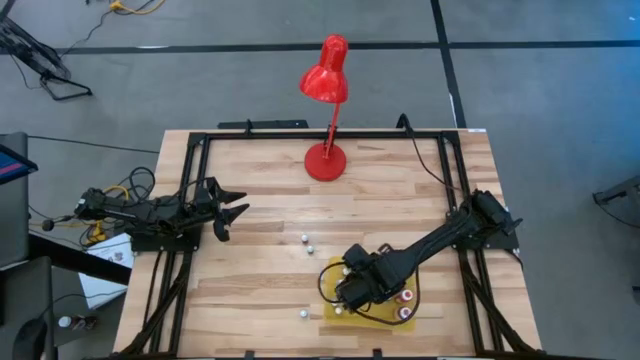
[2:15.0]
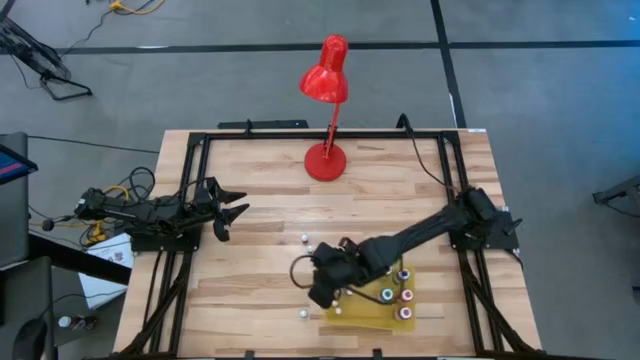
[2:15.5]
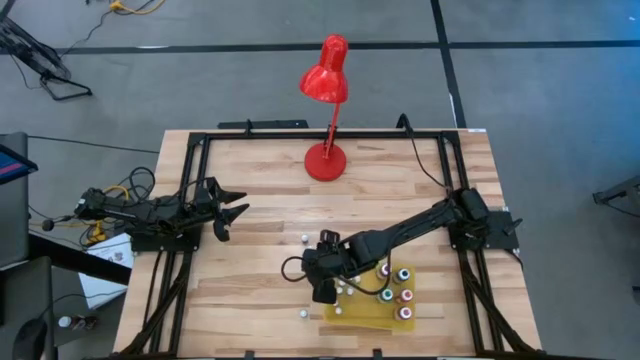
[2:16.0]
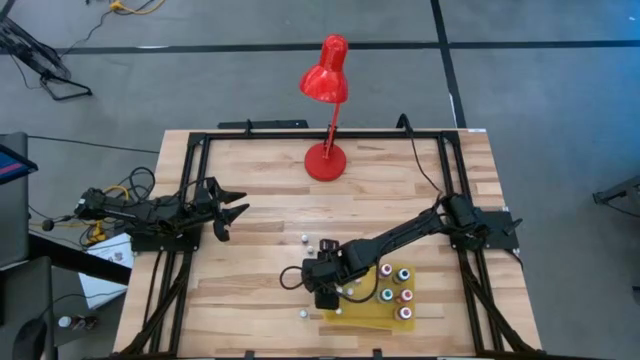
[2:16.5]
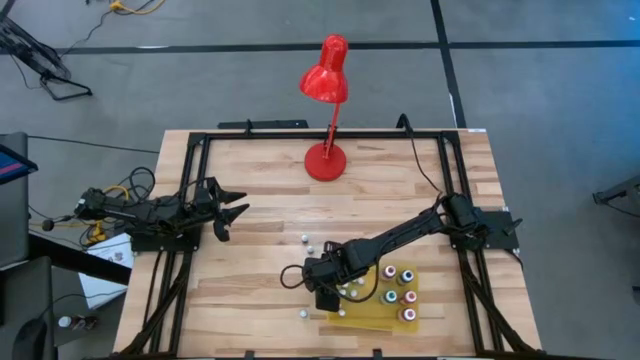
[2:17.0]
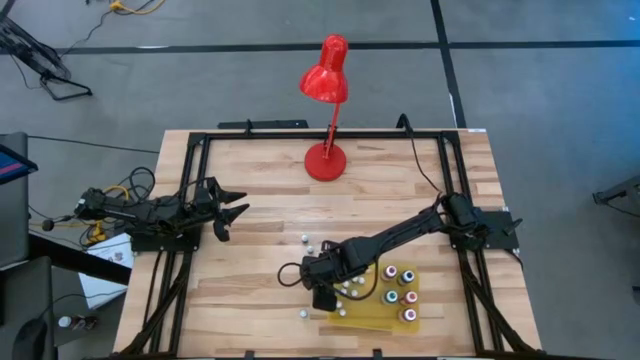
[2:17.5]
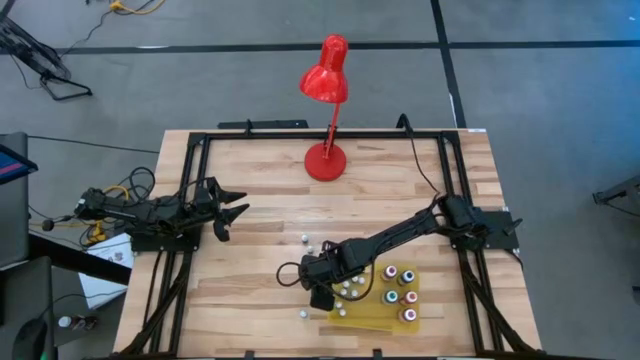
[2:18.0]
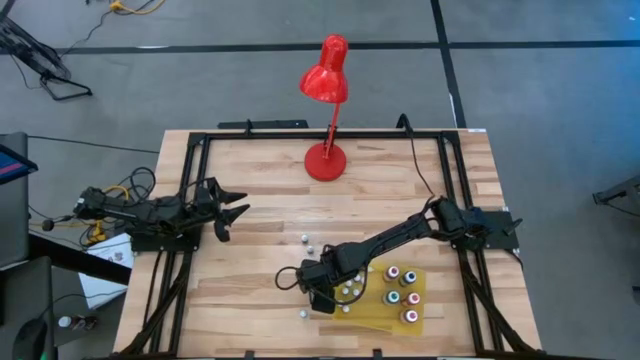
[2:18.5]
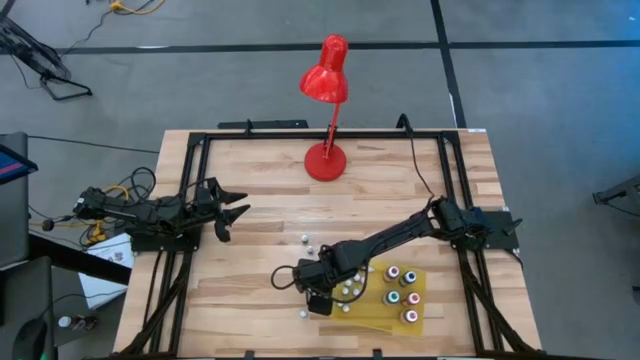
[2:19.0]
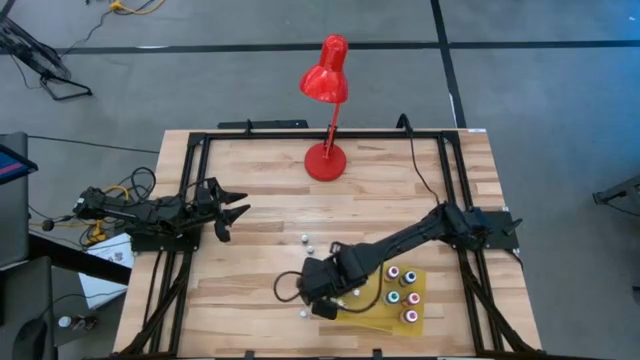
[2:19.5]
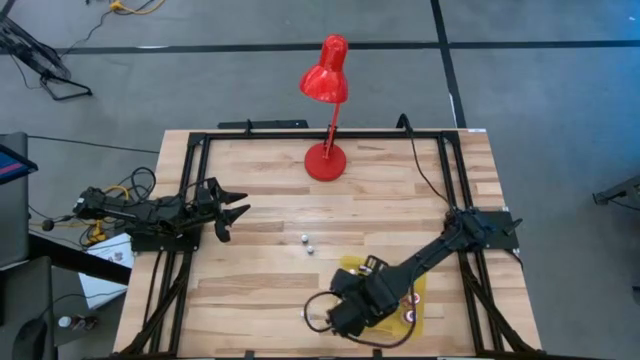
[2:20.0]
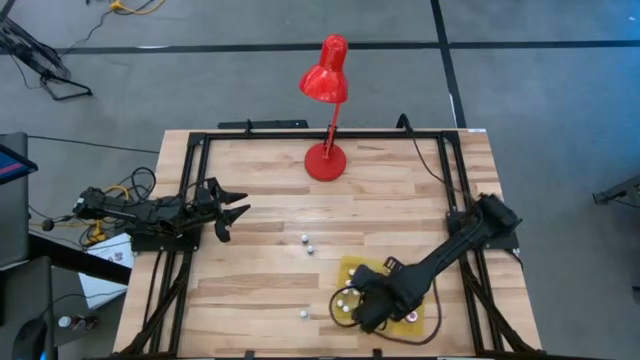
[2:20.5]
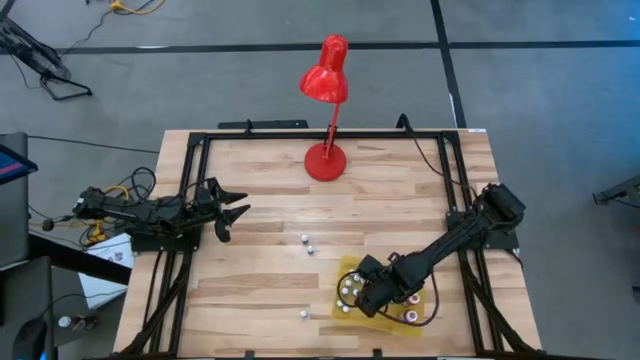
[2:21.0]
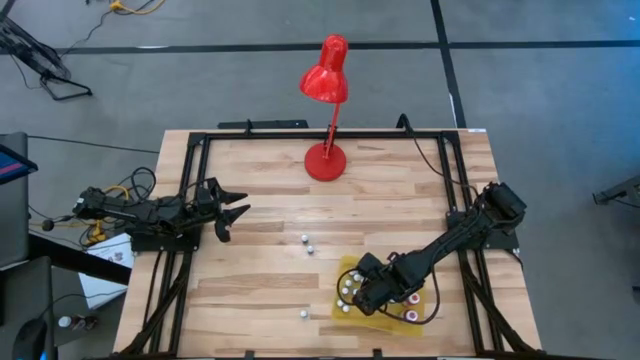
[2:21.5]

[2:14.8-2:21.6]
Task: Pick & Place food coloring
Put the red food coloring into the yellow bin

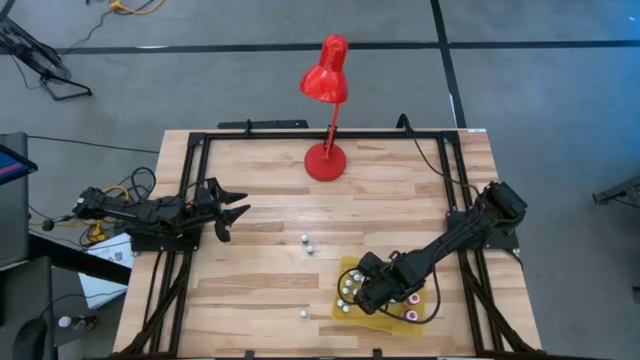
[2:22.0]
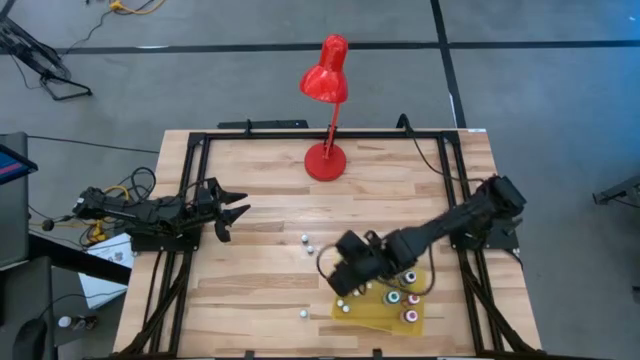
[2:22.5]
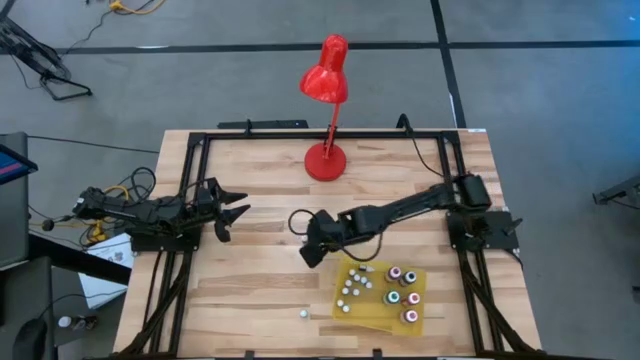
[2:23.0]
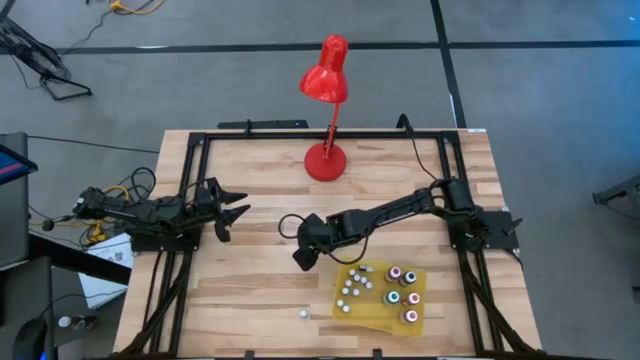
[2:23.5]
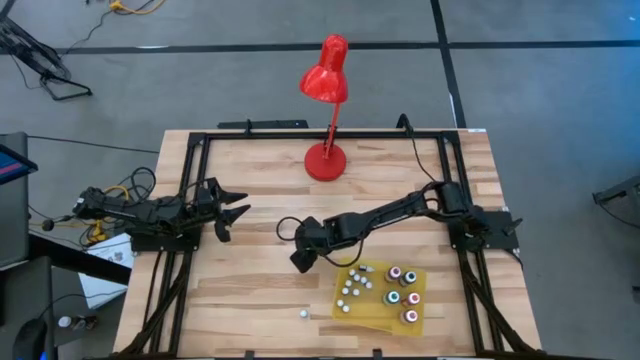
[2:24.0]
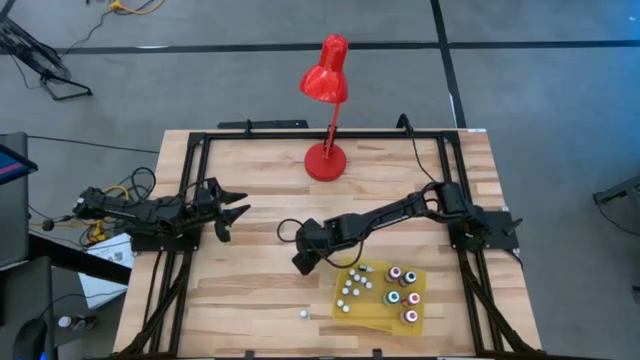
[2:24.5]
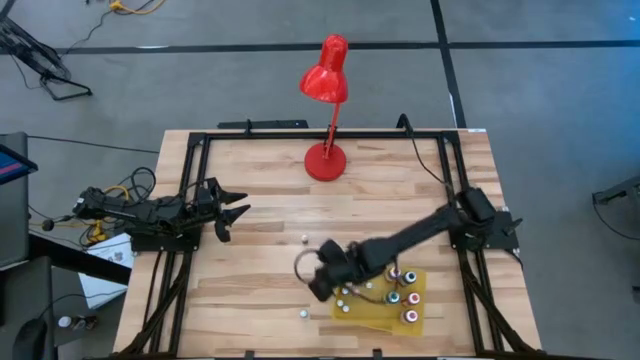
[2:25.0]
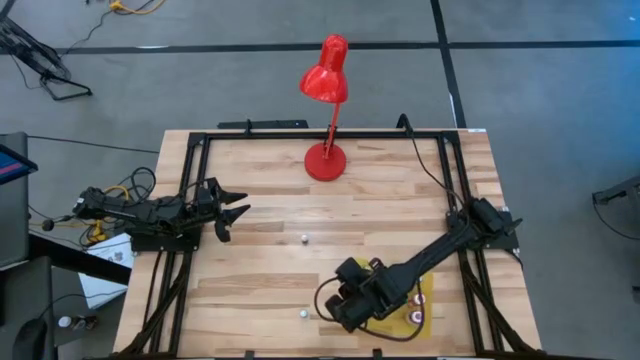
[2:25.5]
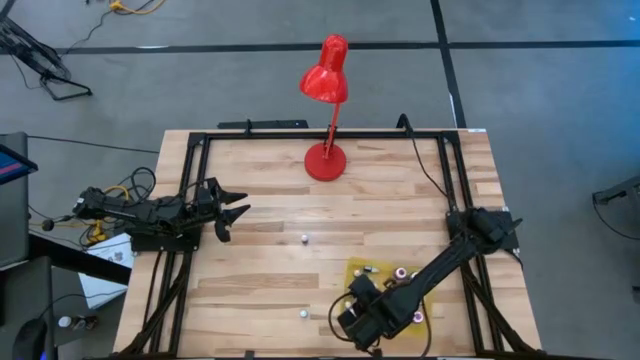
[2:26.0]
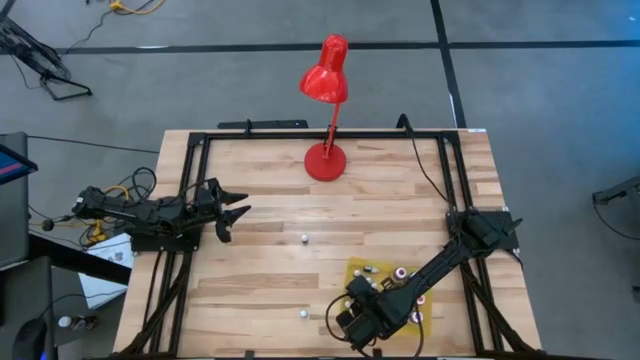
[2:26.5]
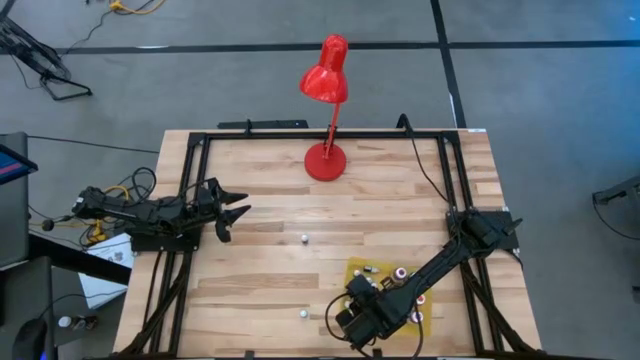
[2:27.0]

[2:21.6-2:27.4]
Put the blue food coloring into the yellow bin

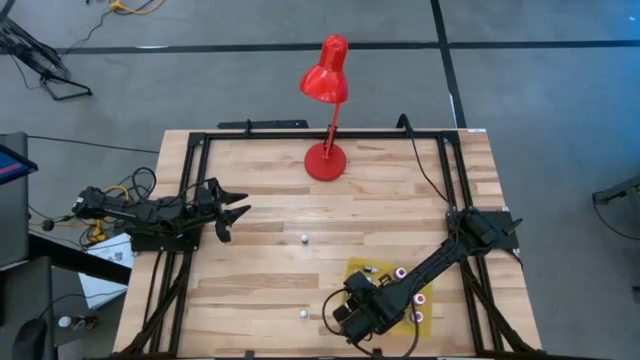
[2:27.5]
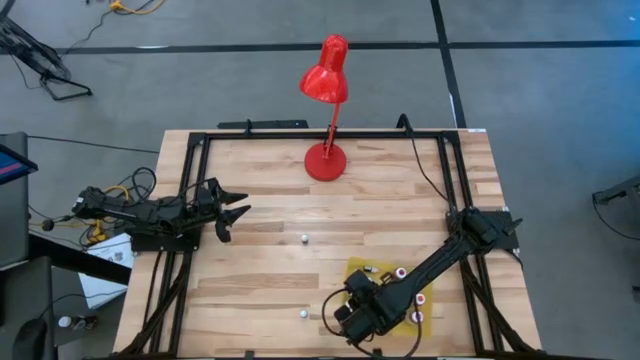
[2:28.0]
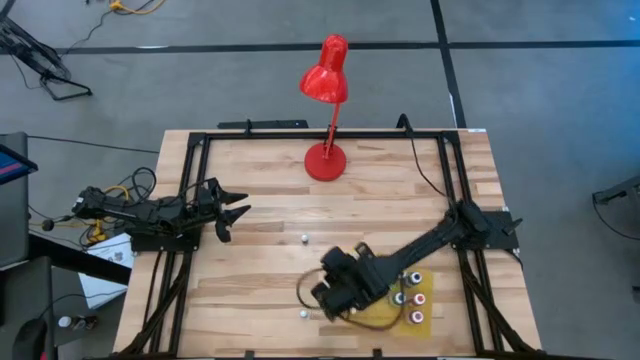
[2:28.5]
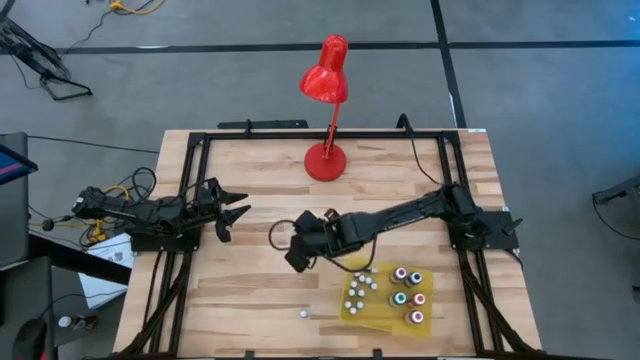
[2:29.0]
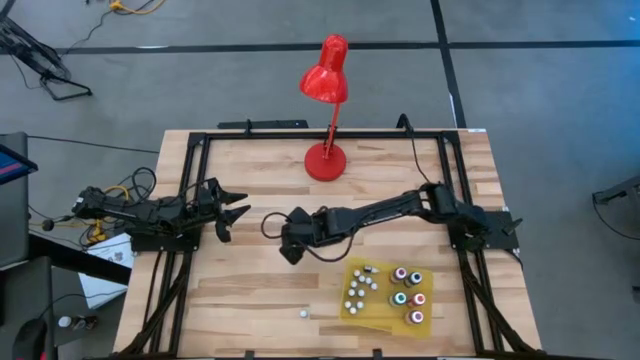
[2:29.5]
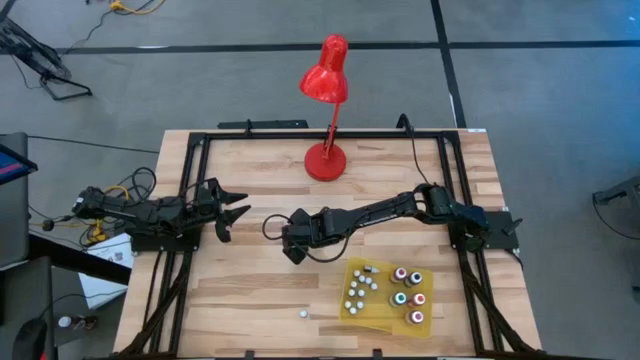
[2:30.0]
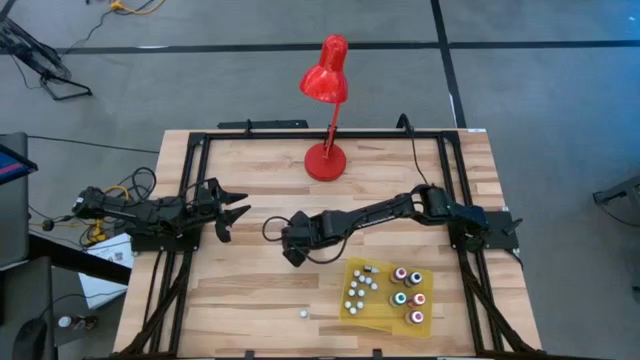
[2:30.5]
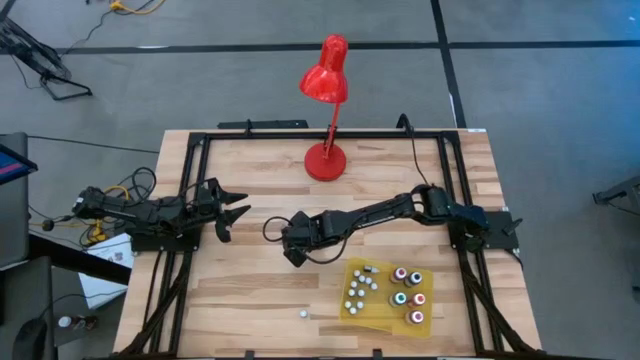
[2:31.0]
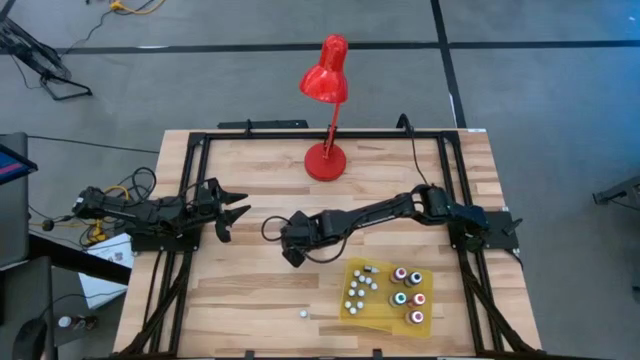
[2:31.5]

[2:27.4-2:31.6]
Put the green food coloring into the yellow bin

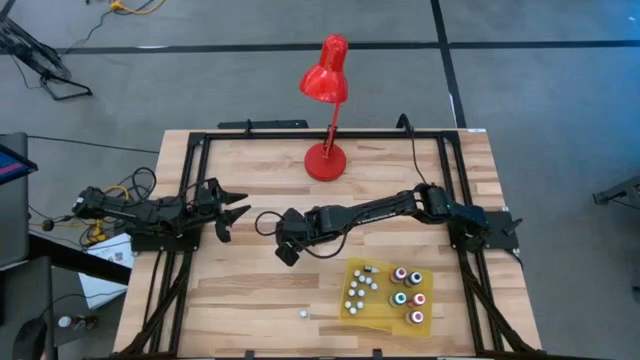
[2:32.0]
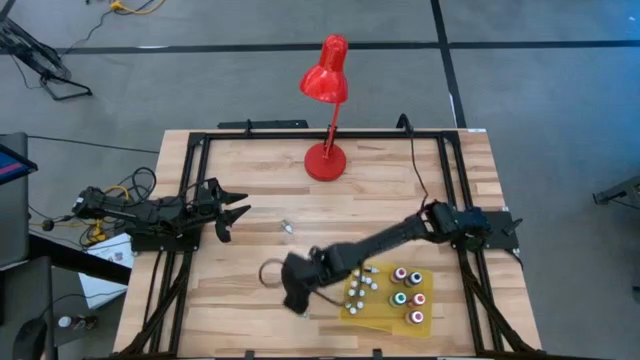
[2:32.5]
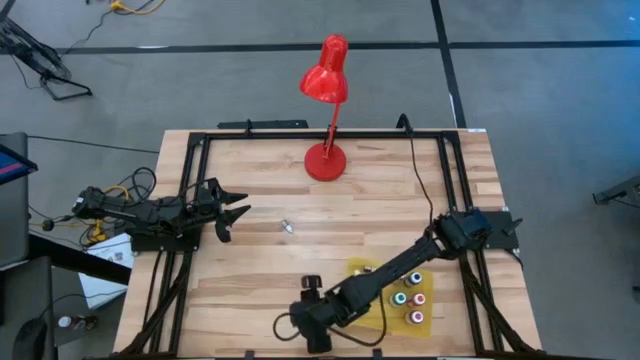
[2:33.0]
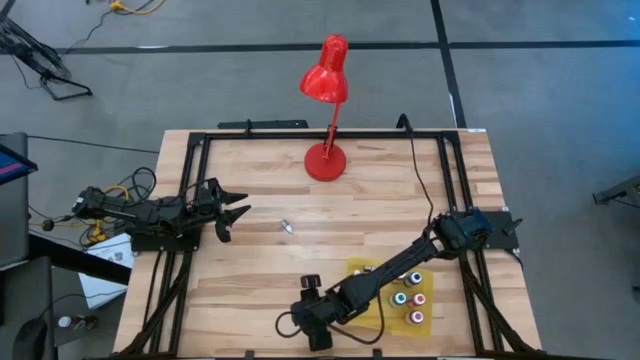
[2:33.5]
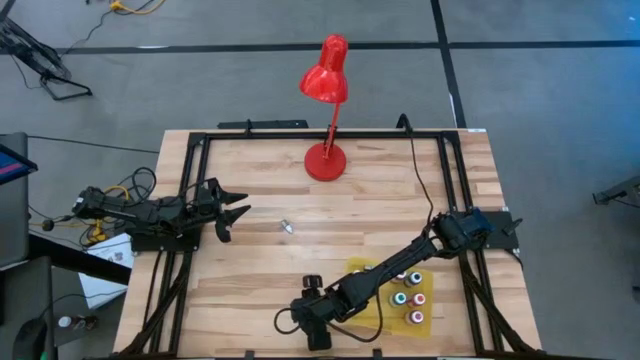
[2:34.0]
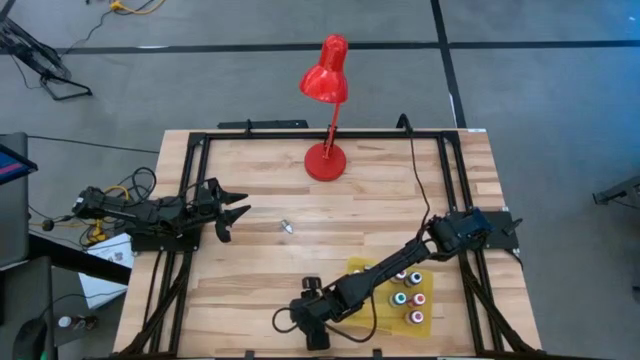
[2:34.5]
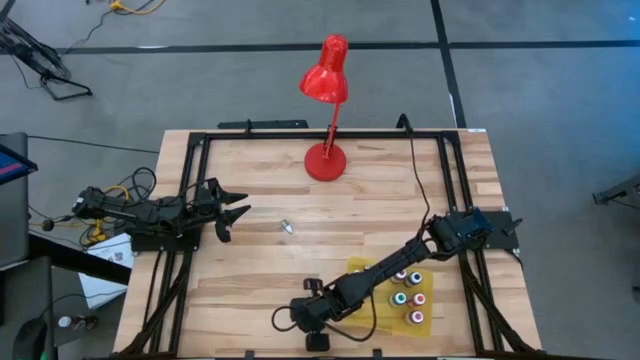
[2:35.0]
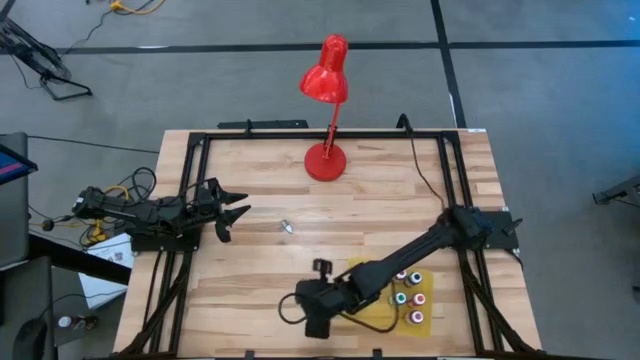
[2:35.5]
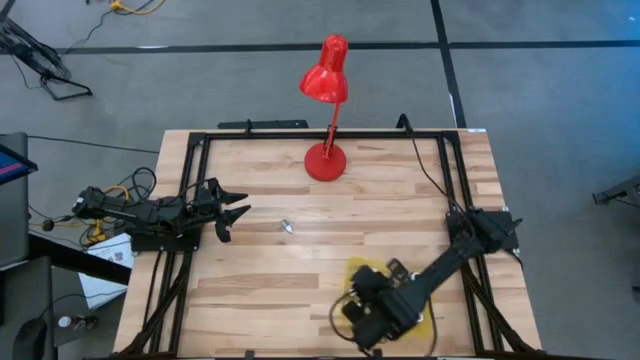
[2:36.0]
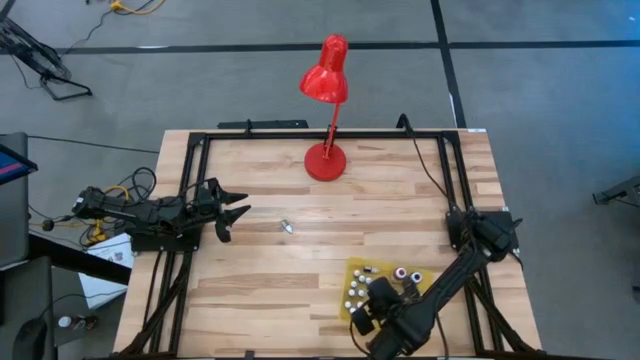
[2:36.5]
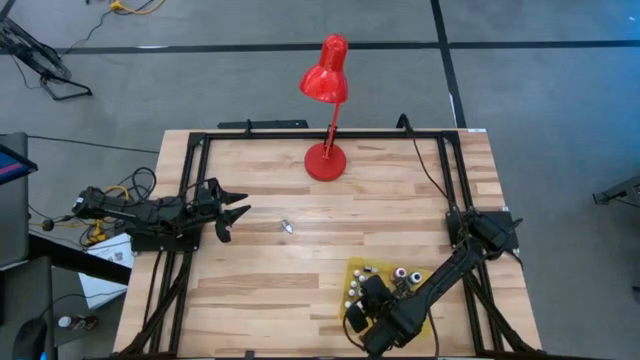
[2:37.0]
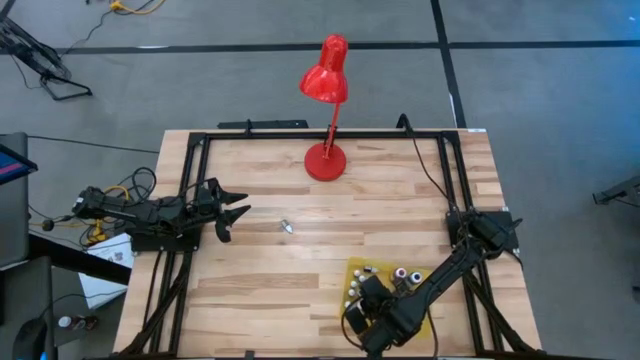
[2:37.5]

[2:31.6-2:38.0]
Put the green food coloring into the yellow bin
